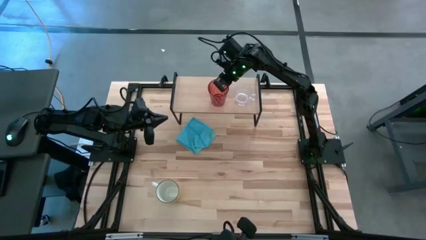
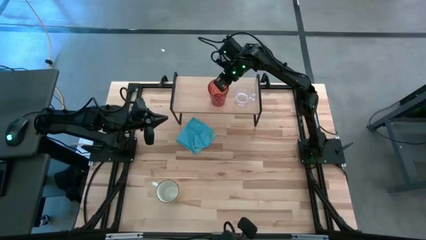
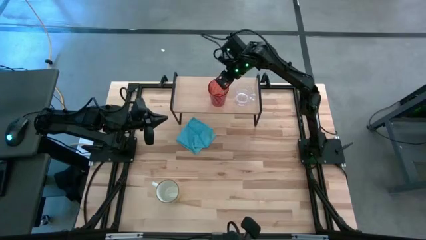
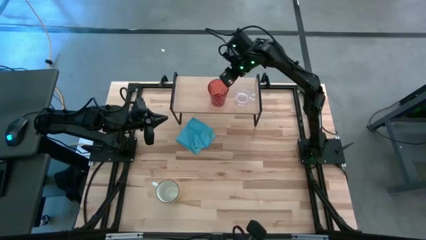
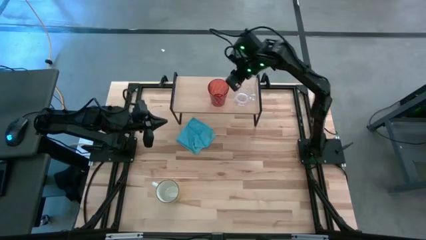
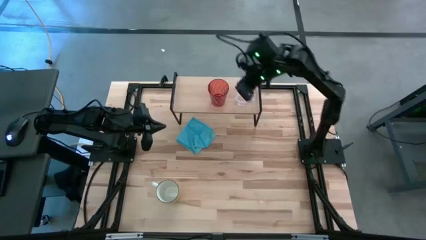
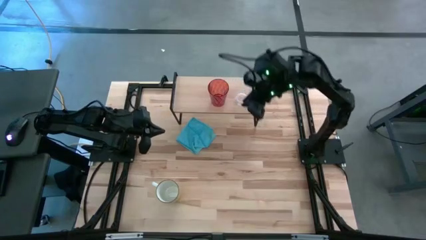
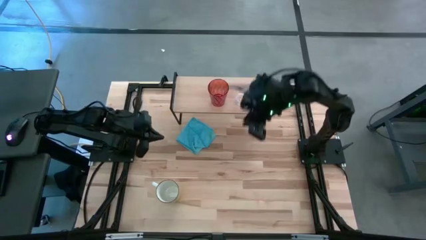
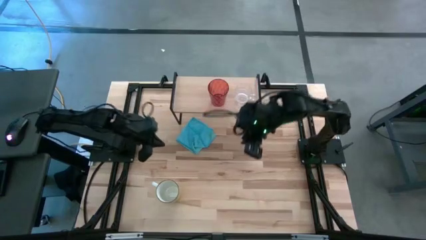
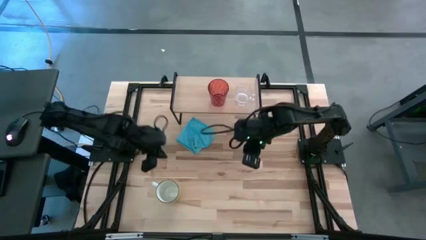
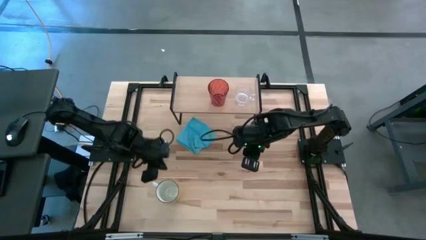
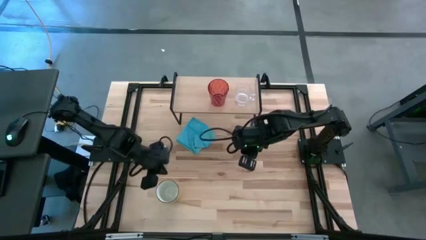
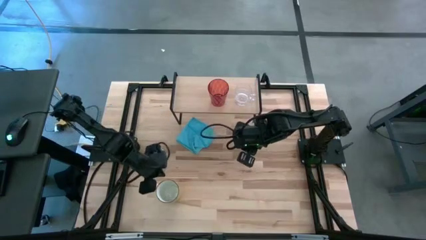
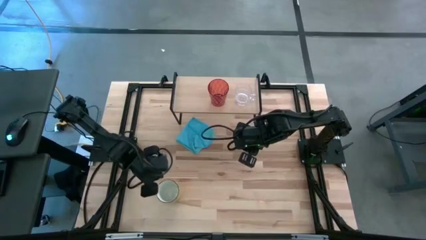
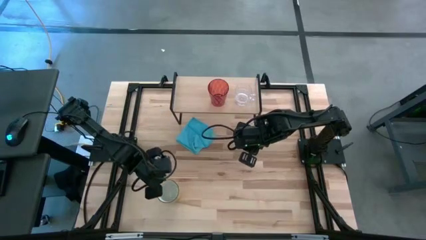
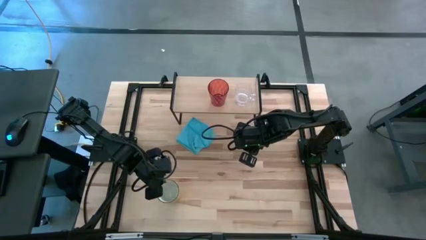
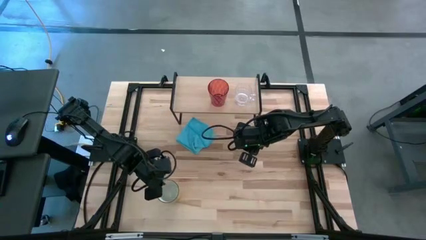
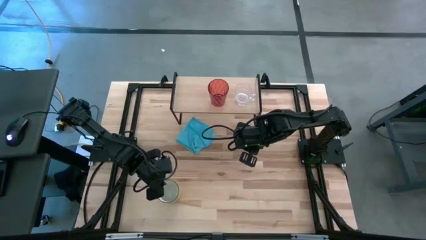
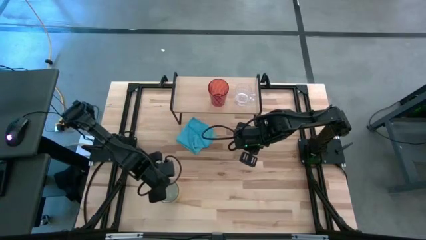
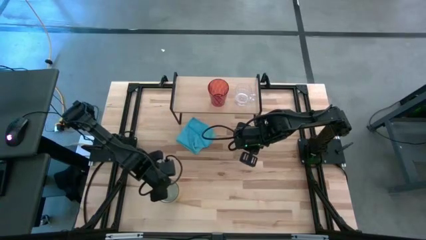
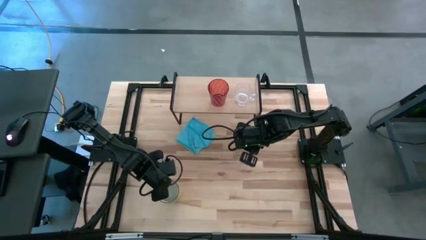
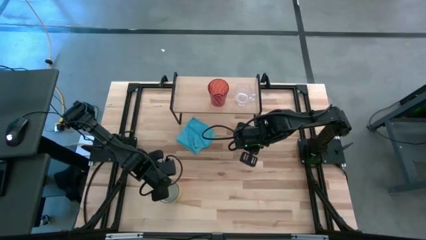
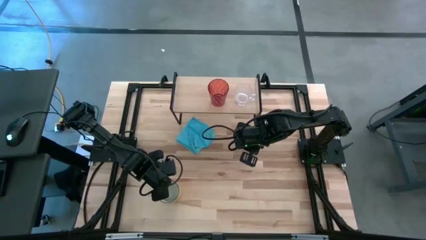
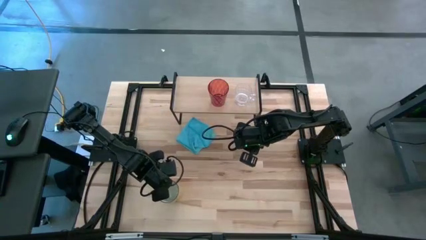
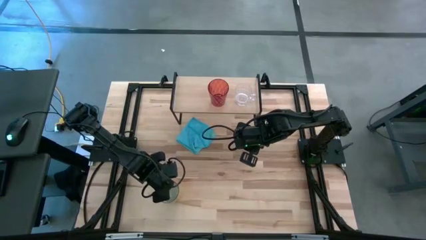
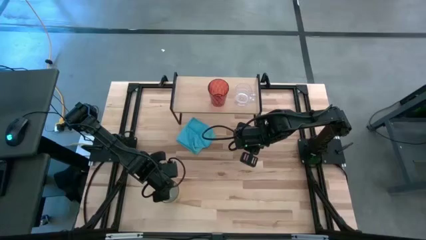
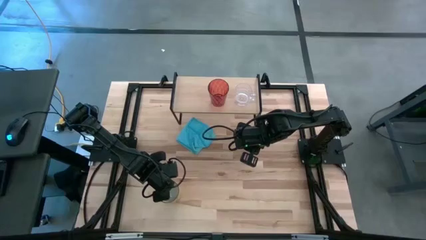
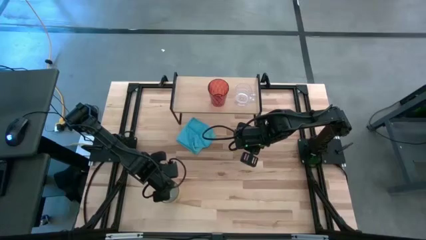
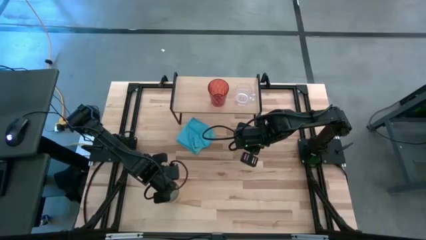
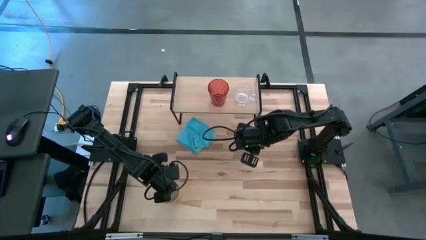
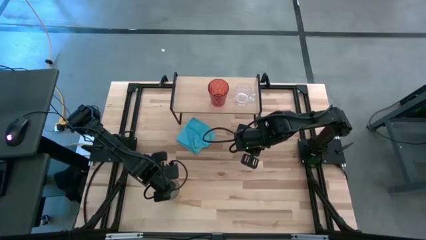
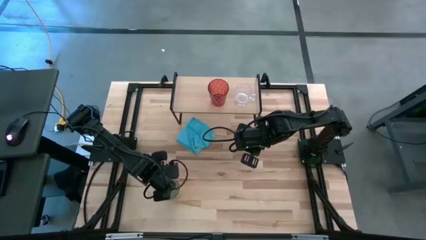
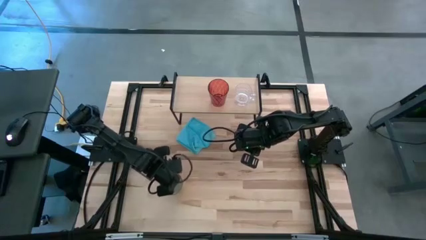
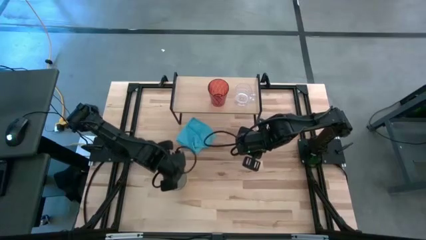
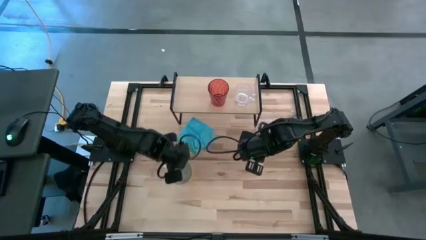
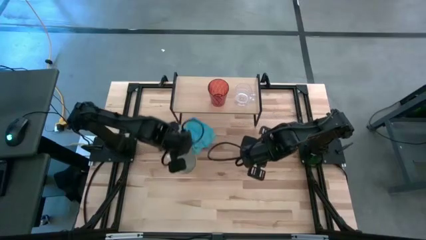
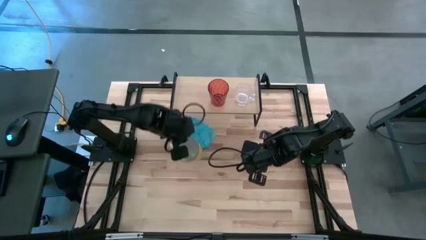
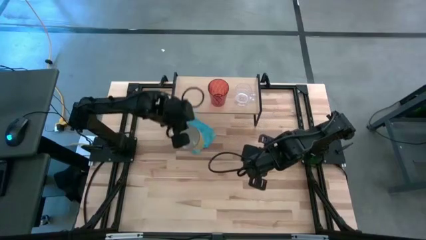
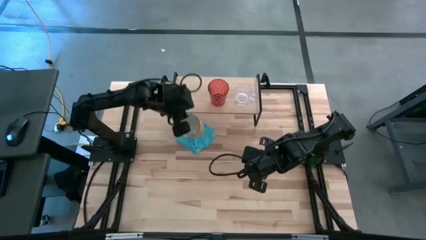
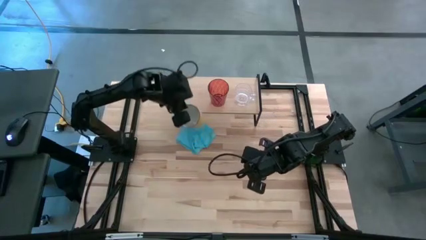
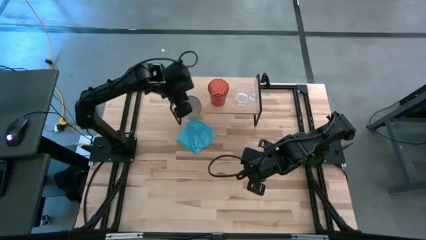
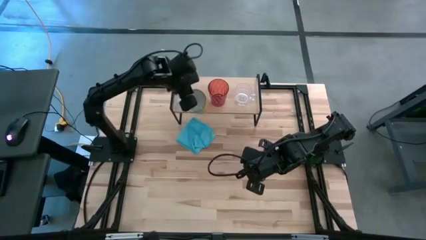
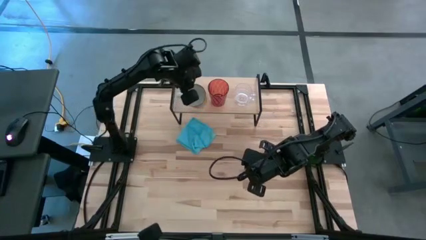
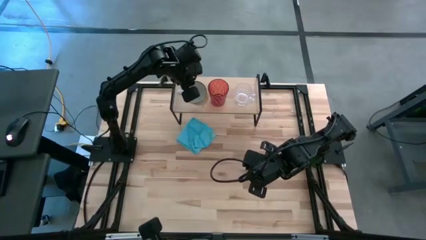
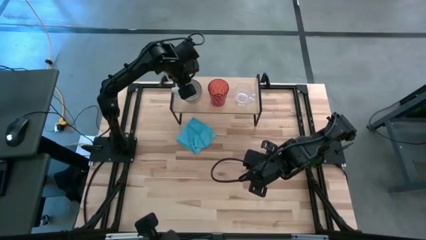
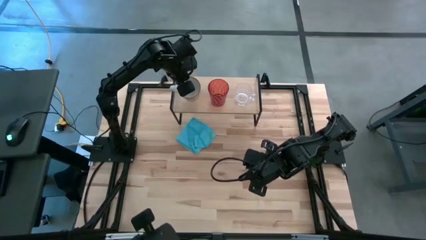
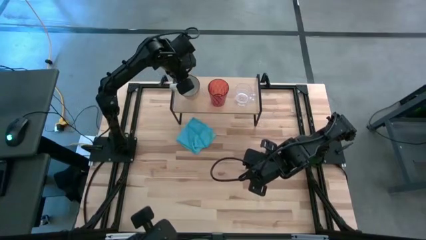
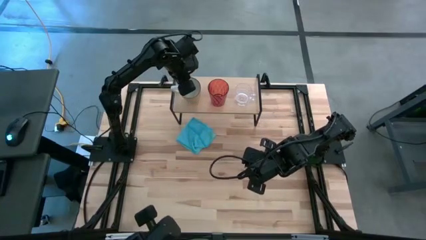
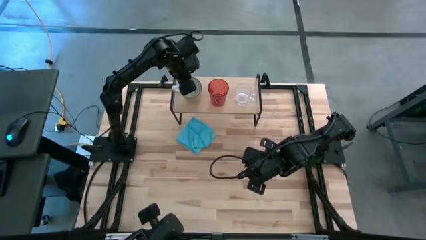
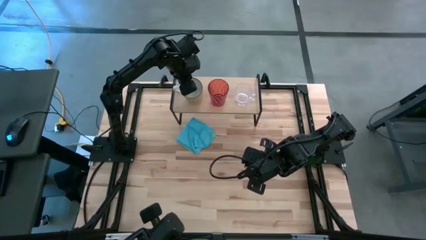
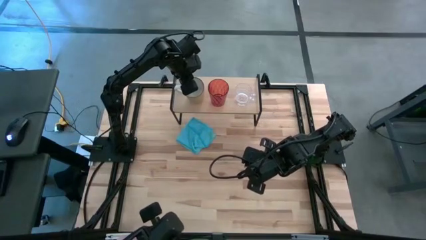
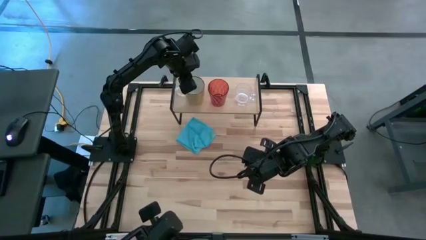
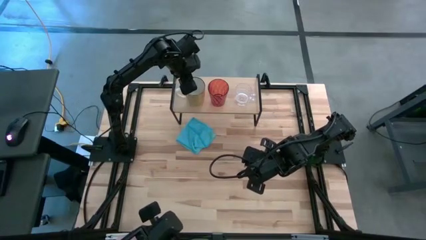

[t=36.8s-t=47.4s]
Task: Stack small to large cups/mugs on shelf
Put the yellow mug on the shelf
